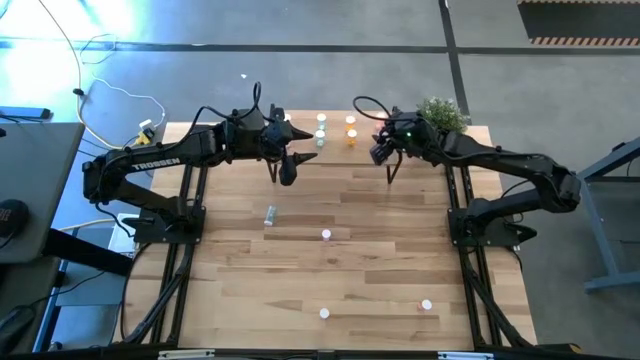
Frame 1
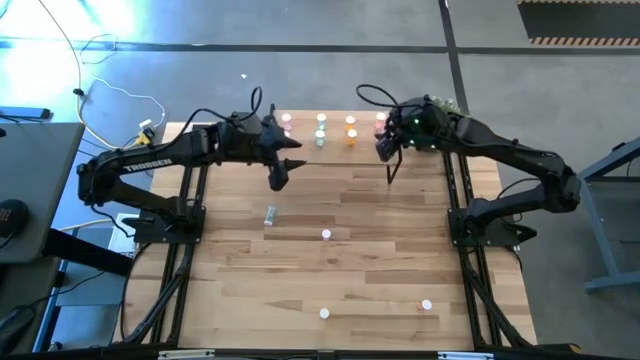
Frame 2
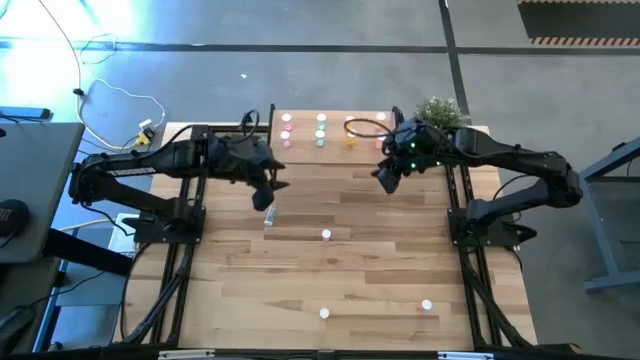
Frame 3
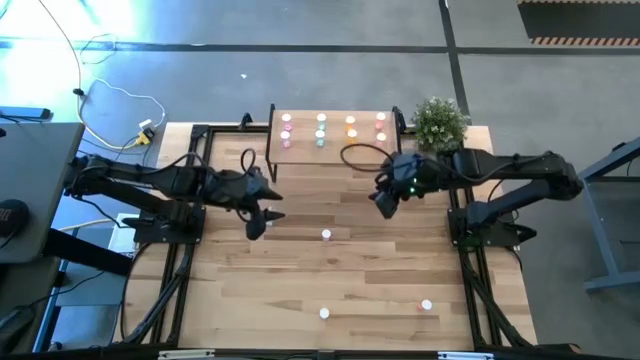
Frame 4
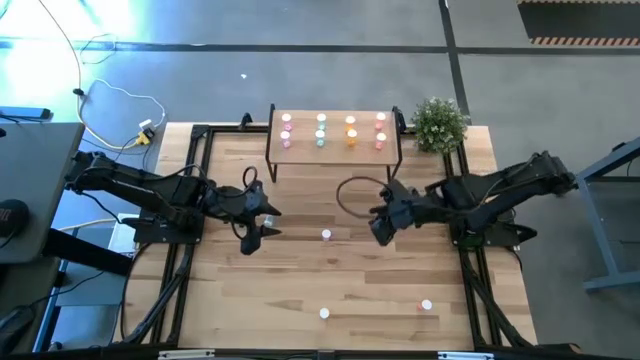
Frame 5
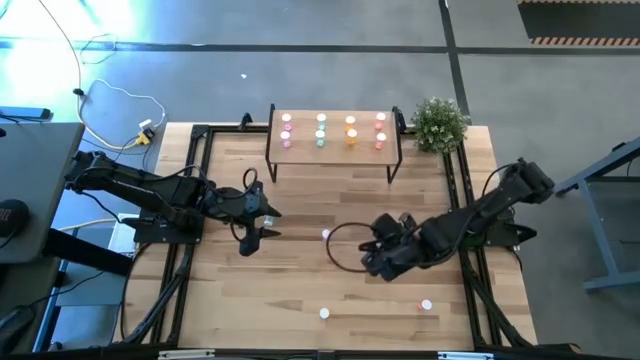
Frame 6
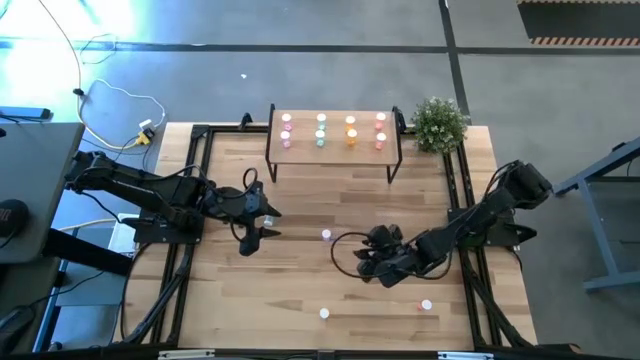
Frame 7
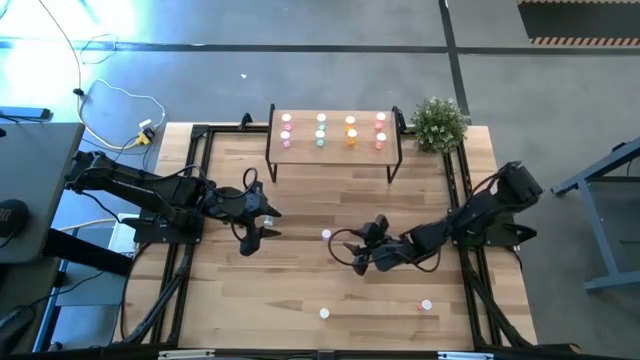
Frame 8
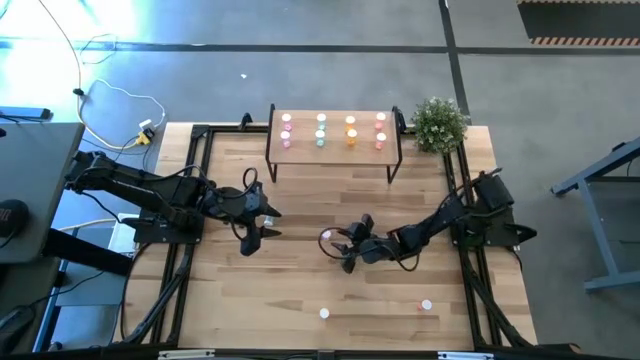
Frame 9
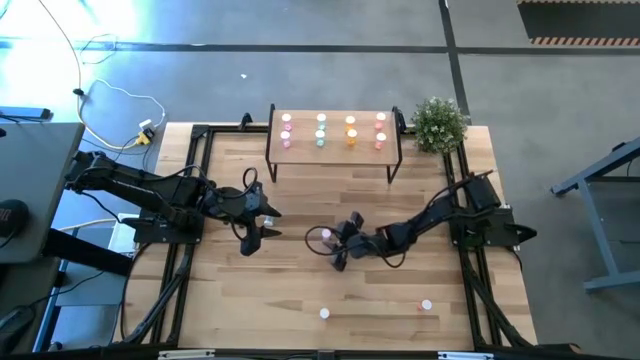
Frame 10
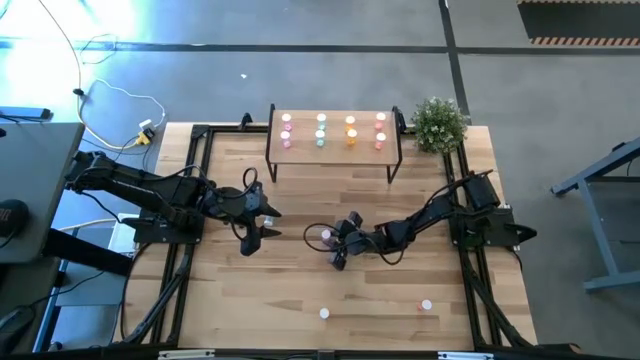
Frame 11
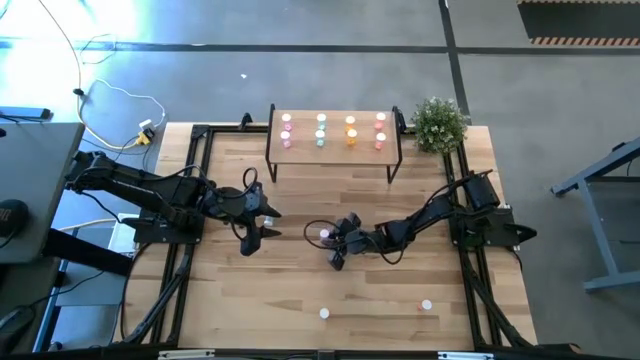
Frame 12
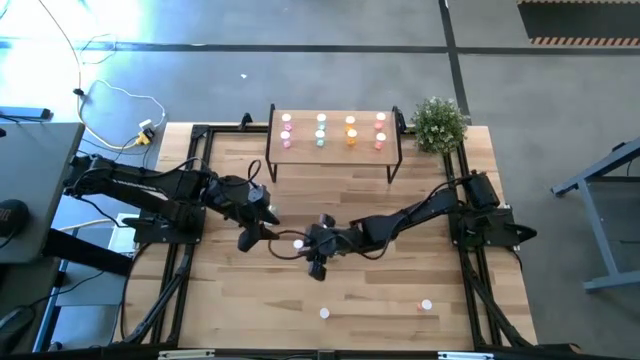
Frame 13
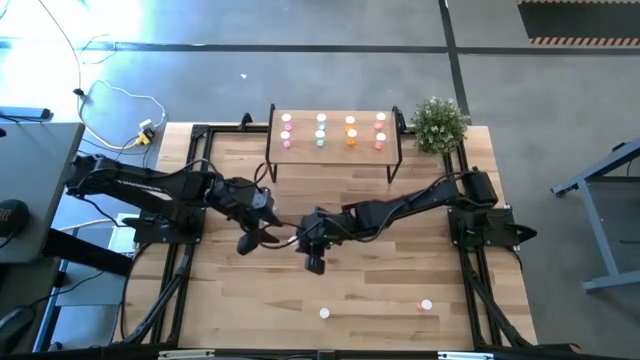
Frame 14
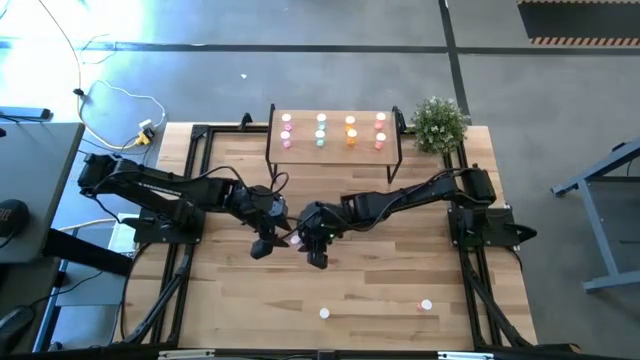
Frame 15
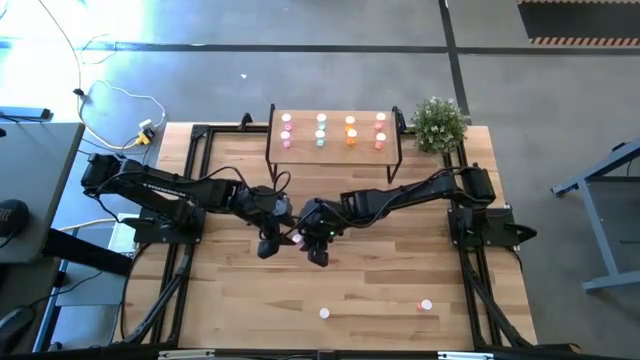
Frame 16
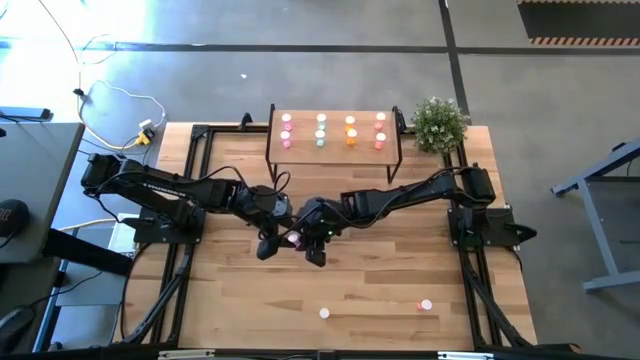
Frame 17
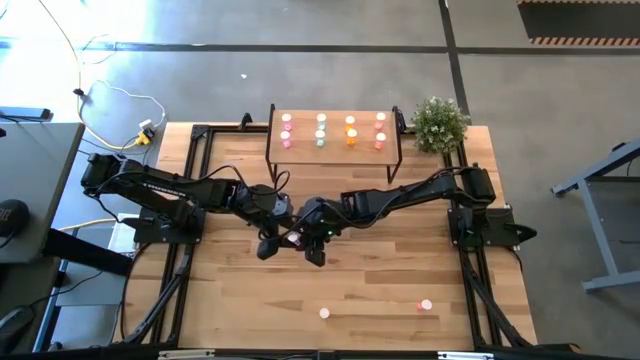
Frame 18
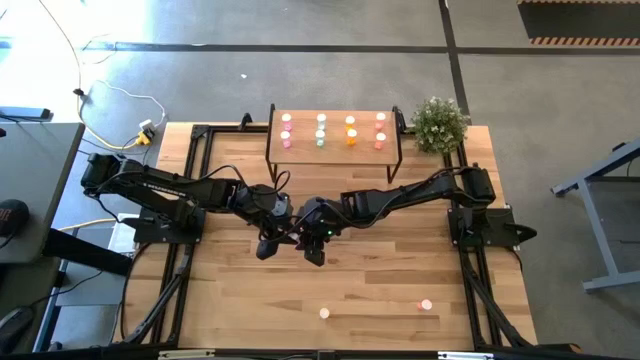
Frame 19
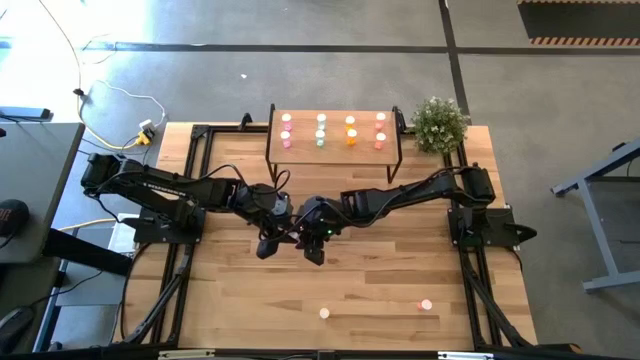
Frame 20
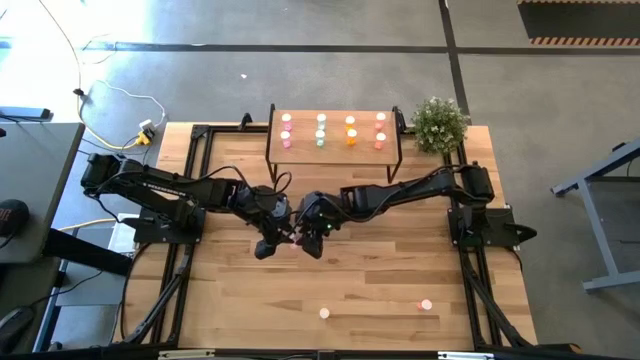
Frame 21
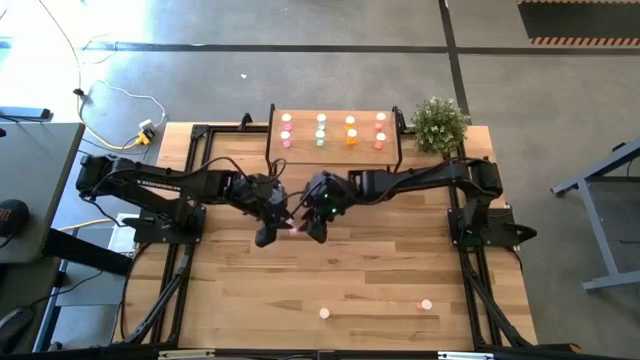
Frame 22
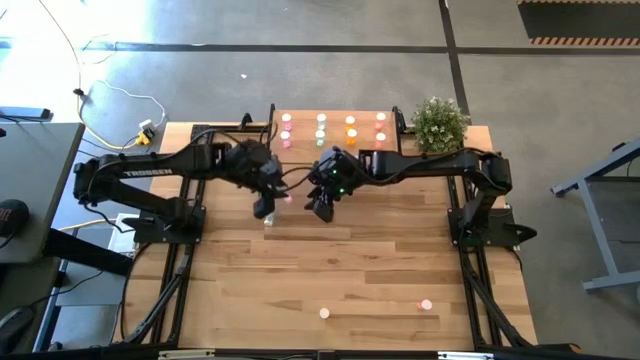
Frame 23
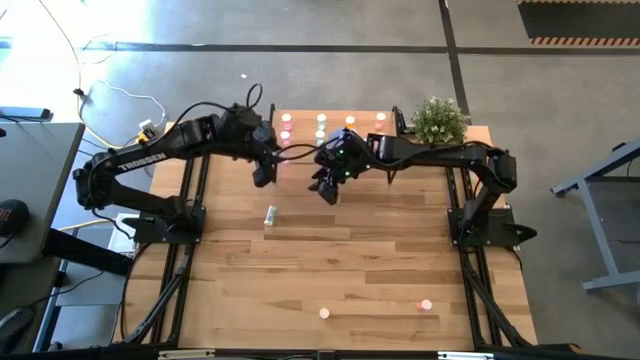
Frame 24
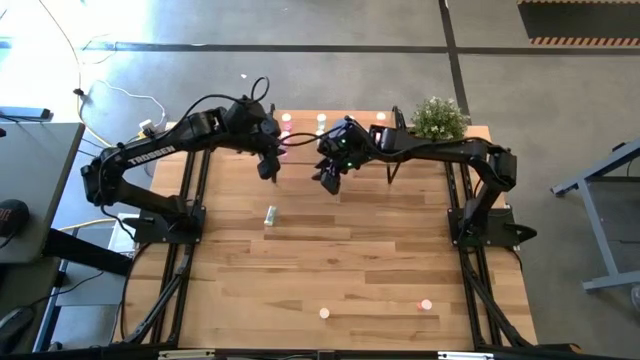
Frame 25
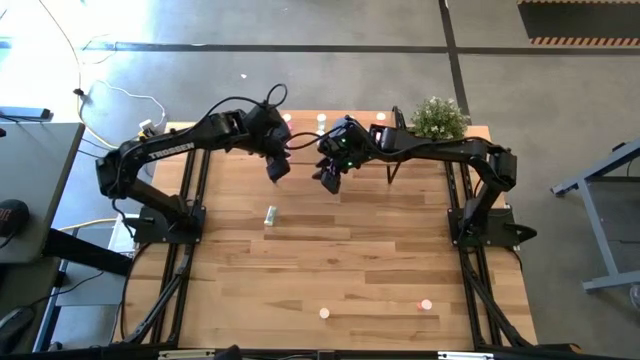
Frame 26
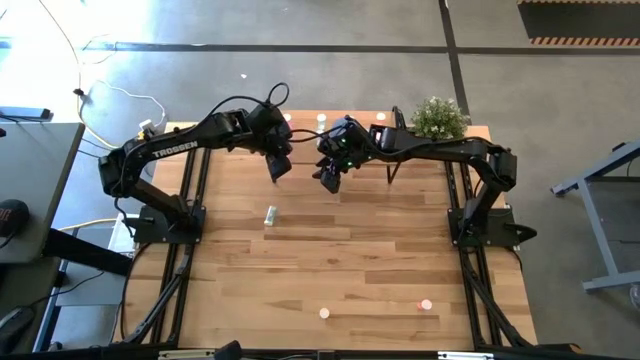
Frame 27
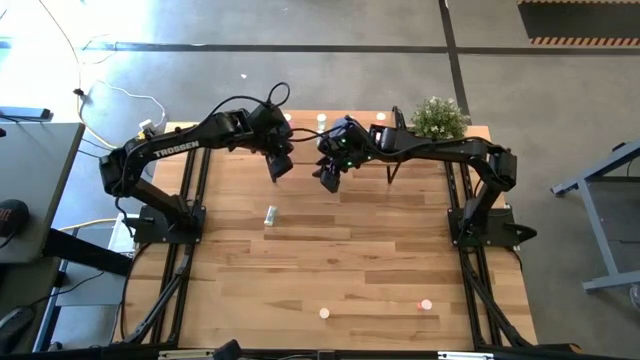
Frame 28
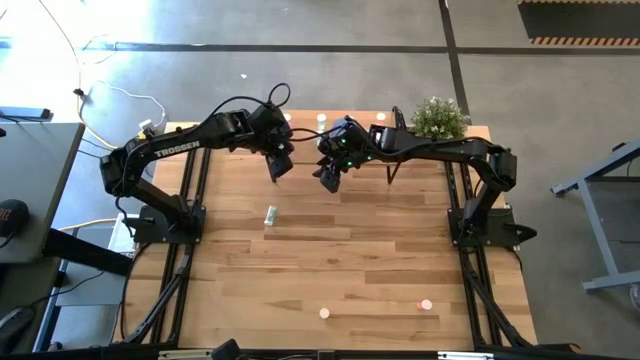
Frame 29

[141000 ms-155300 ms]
Task: Pick and place medicine bottles onto shelf by color
Put the pink pill bottle on the shelf aligned with the pink bottles

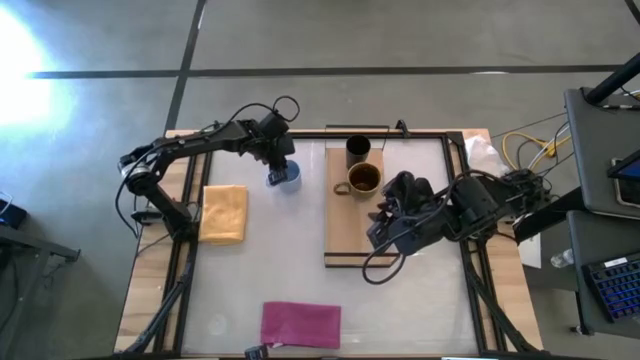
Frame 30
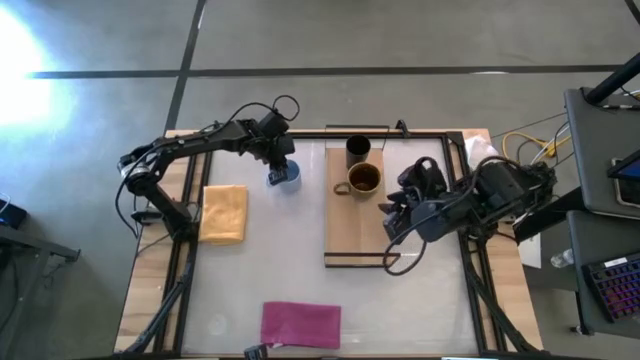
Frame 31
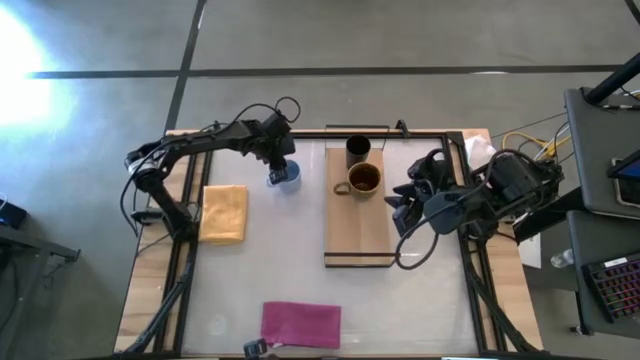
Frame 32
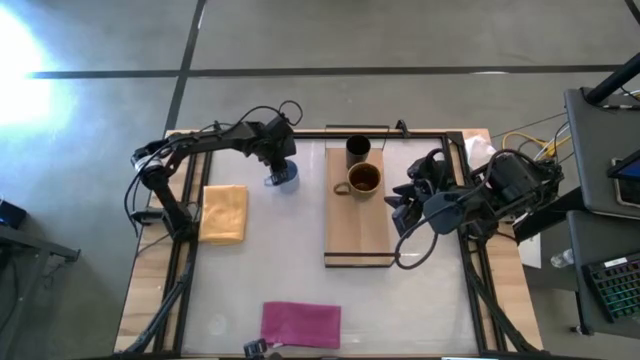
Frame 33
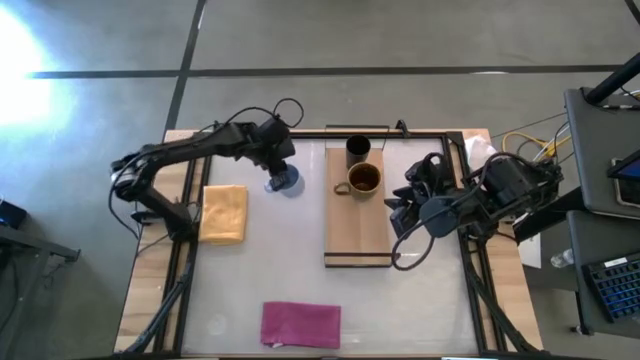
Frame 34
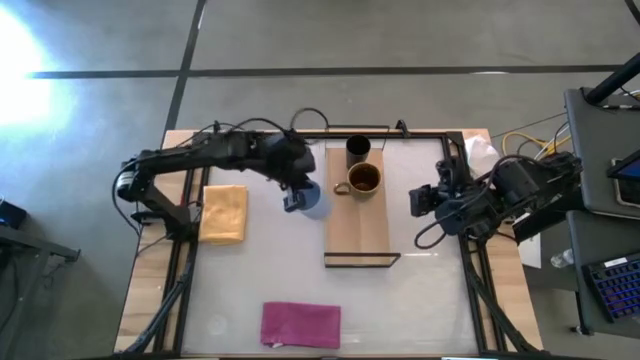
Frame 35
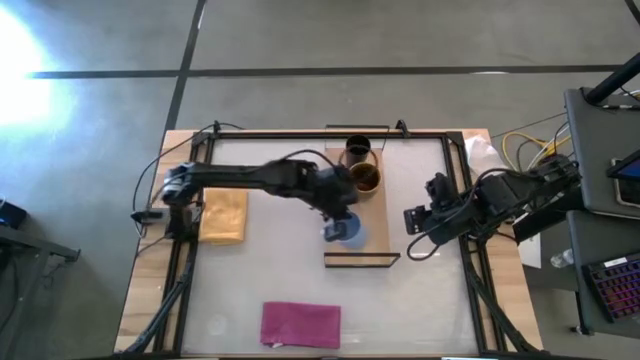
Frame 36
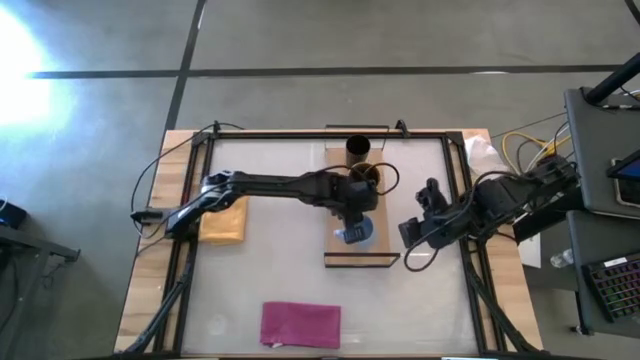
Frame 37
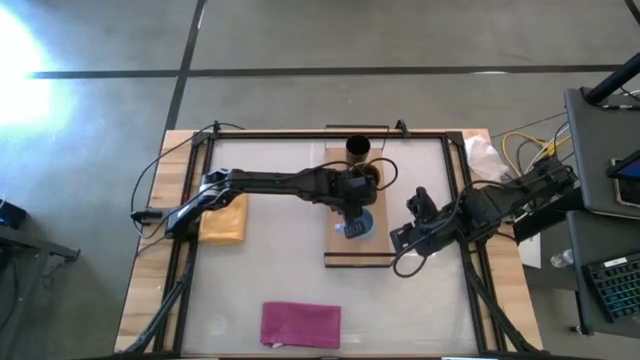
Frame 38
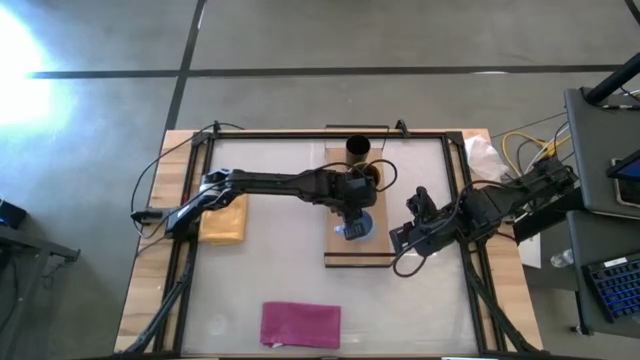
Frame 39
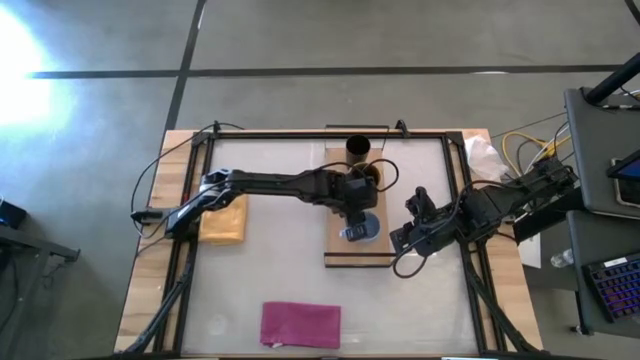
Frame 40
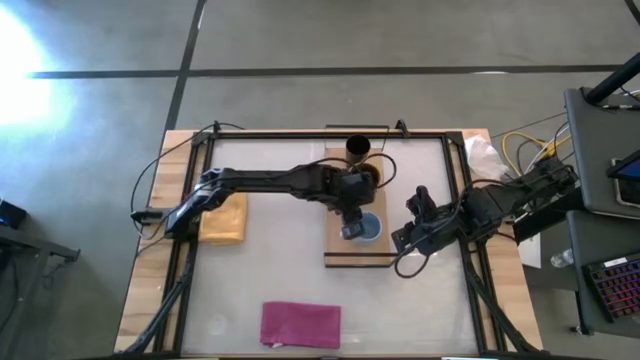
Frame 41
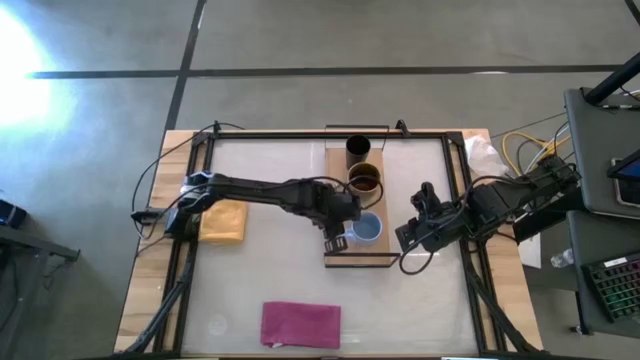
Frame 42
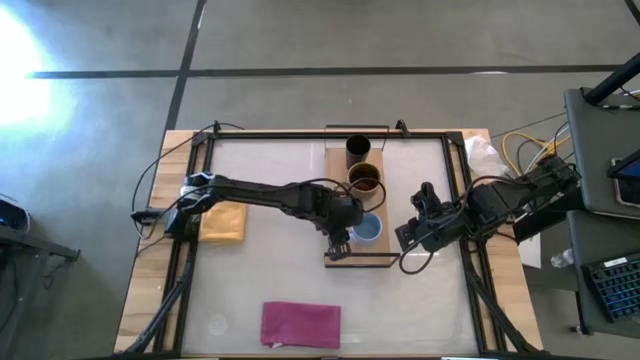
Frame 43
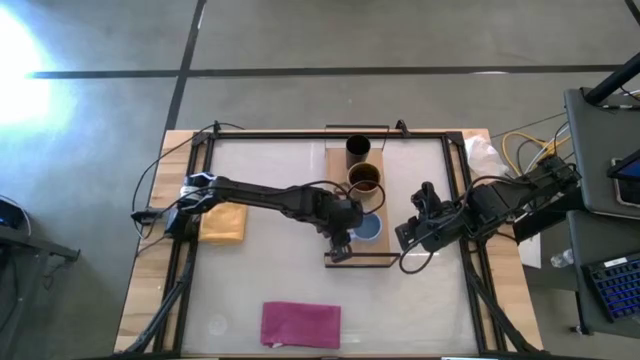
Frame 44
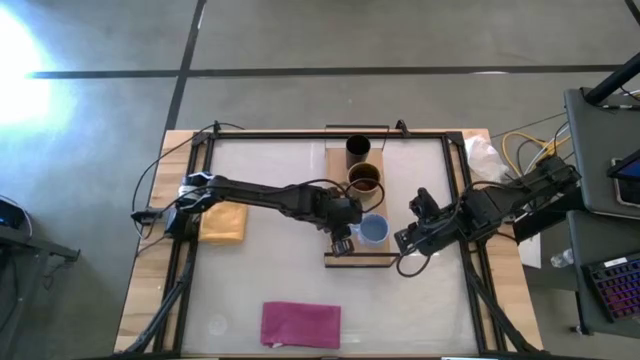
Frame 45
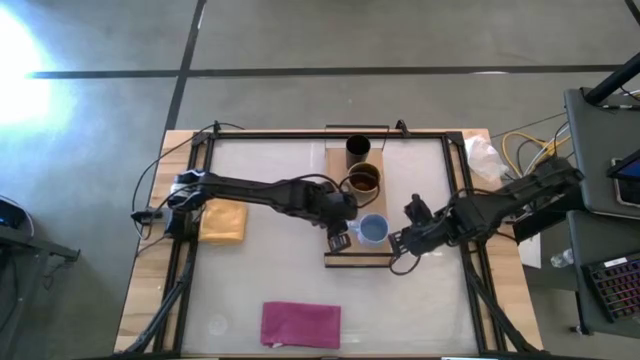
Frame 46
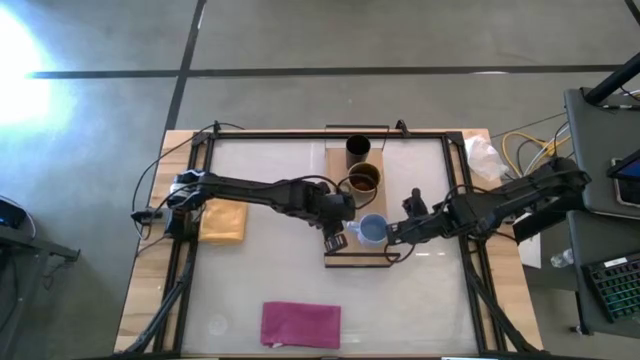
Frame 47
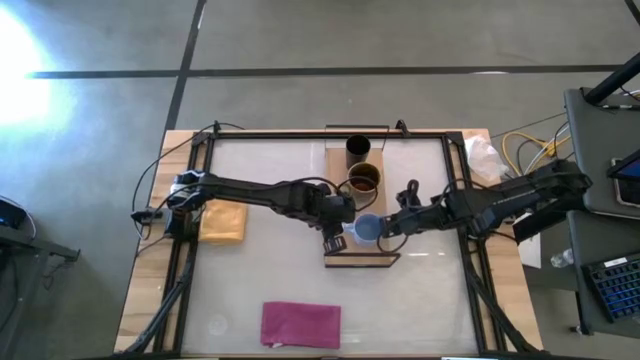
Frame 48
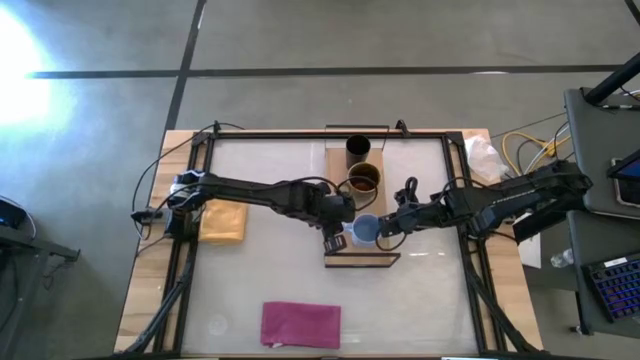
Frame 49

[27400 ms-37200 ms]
Task: Stack small to large cups/mugs on shelf
Put the blue mug on the shelf
